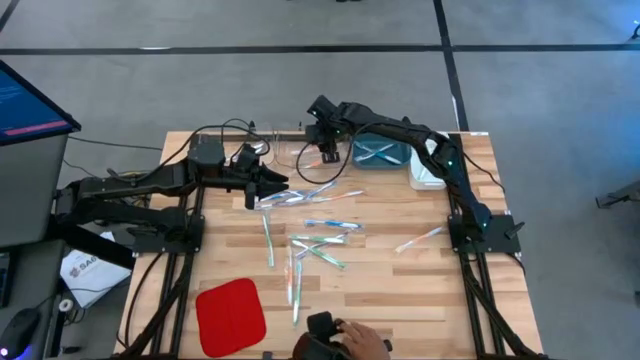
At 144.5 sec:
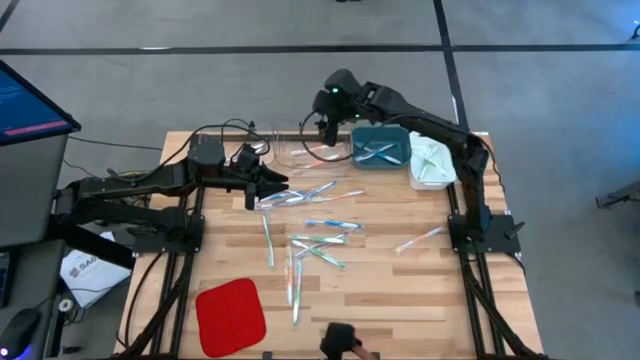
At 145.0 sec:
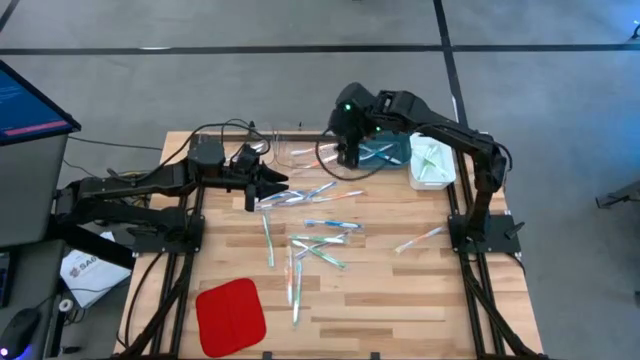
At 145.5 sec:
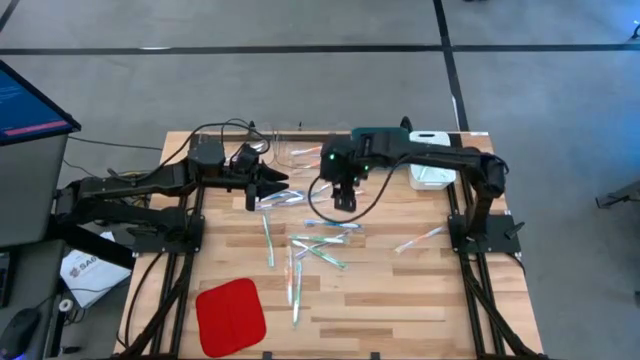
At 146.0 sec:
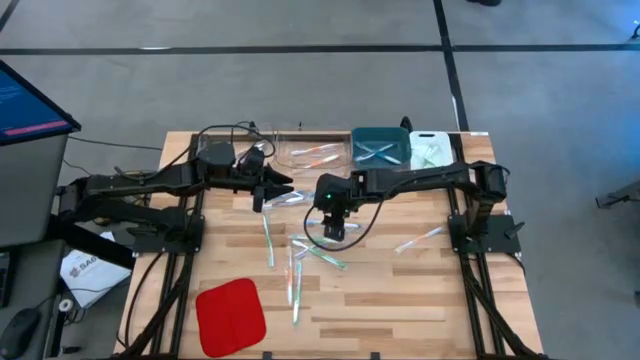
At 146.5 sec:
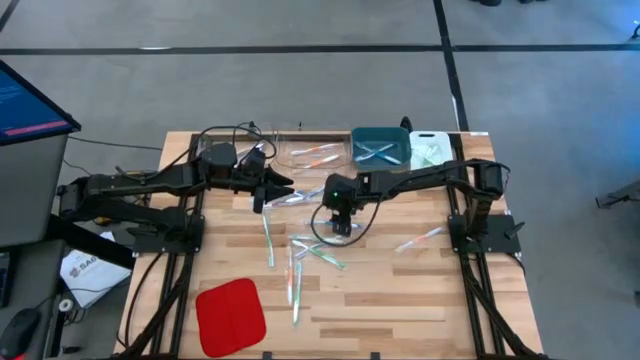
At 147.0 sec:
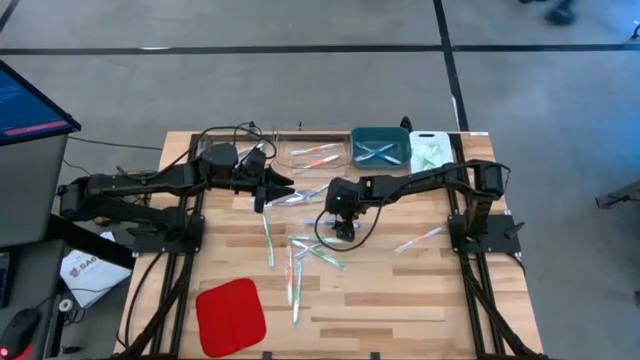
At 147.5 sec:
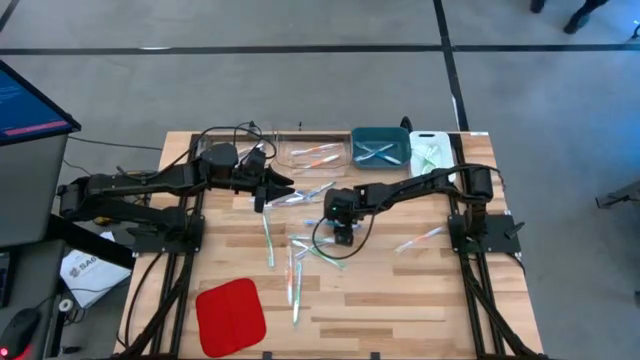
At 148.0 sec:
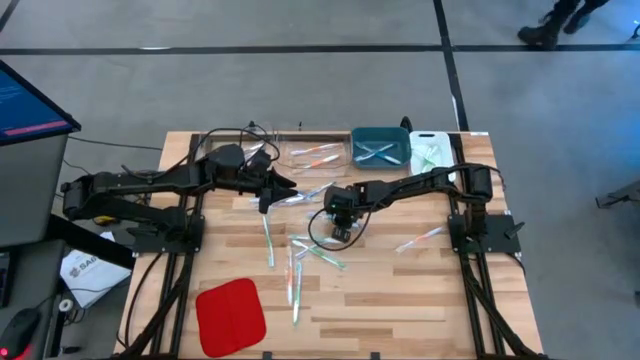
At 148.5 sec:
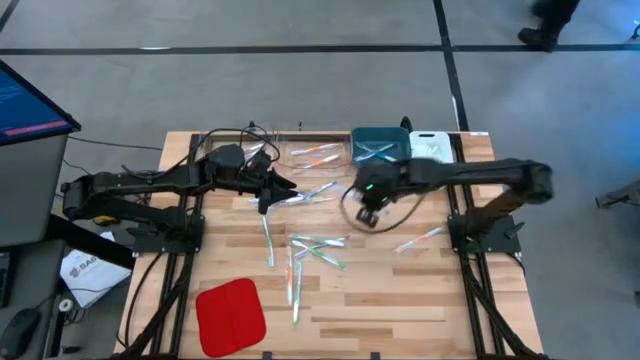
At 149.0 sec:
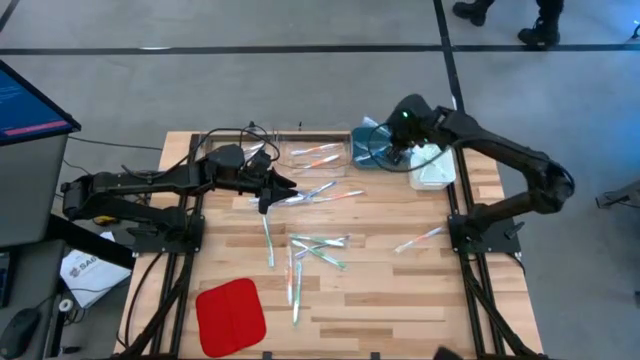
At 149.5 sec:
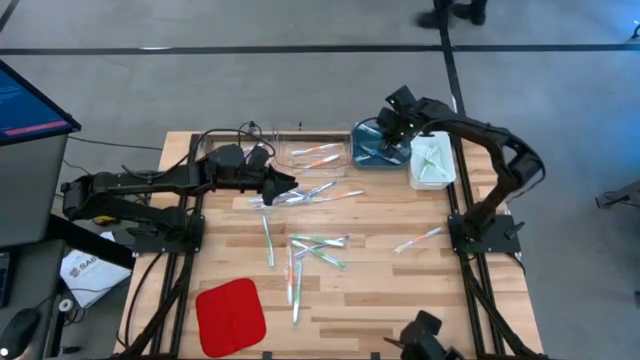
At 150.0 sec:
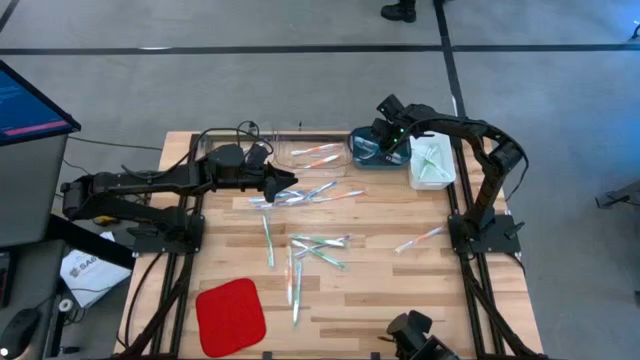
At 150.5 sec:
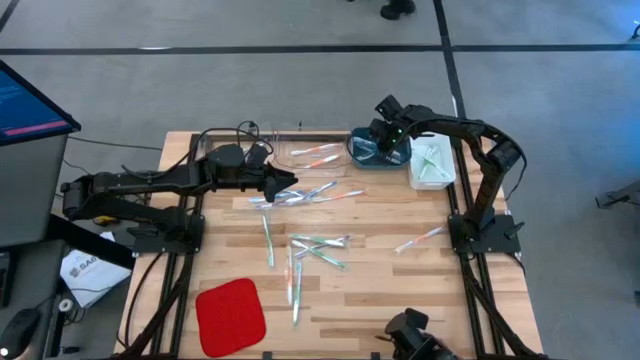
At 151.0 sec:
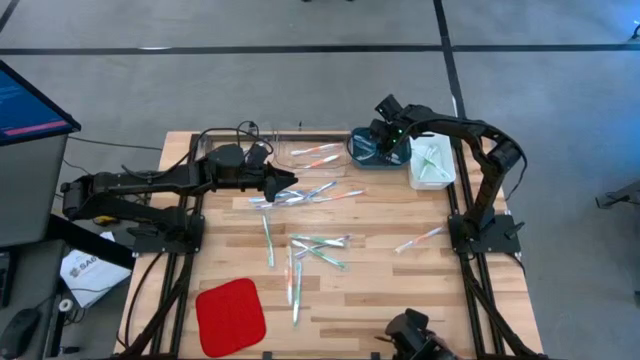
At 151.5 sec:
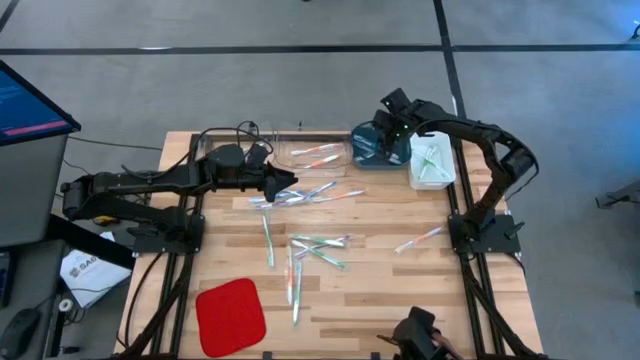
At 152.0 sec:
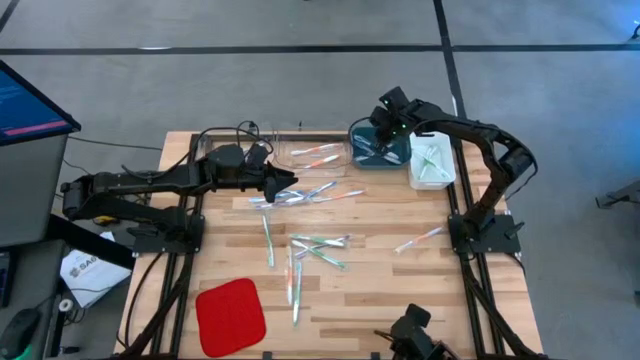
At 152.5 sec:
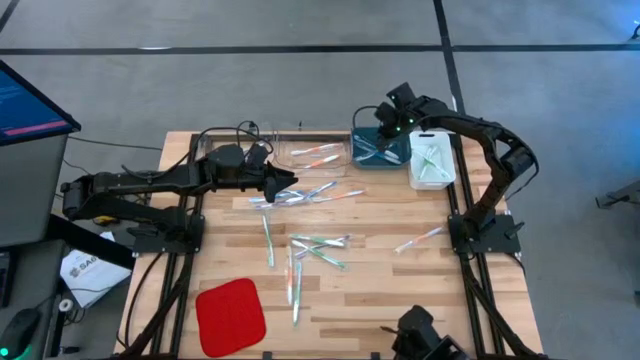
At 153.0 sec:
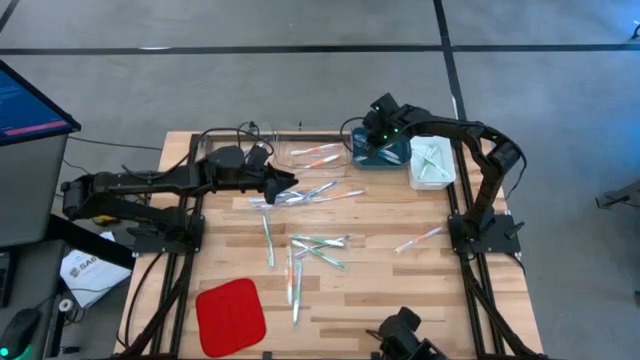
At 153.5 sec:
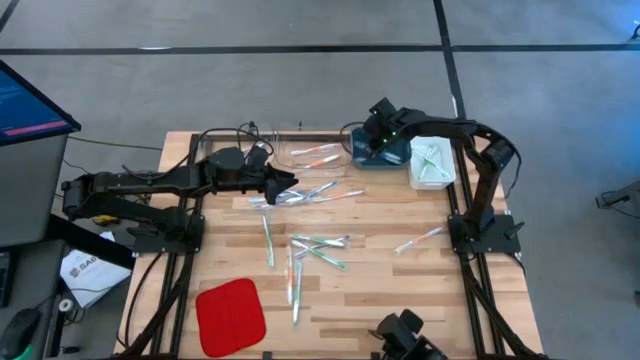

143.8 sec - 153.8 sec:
Task: Pick & Place Toothbrushes
Put the blue toothbrush into the blue bin

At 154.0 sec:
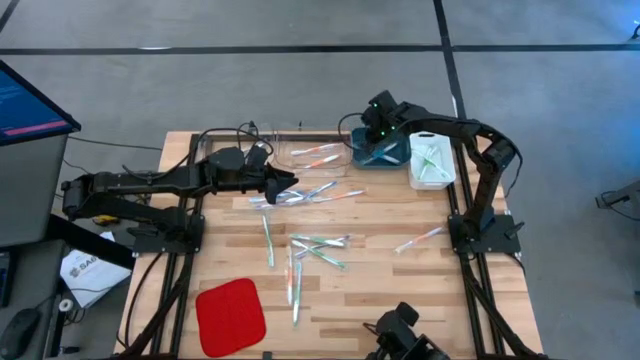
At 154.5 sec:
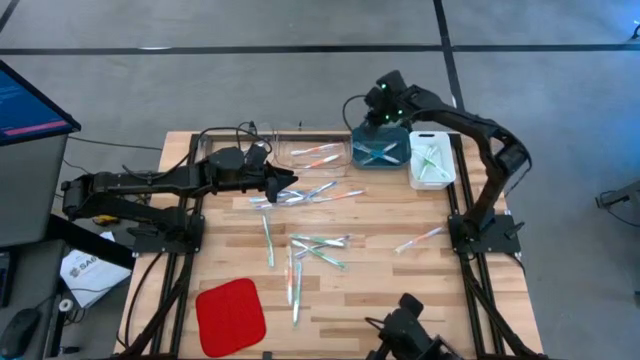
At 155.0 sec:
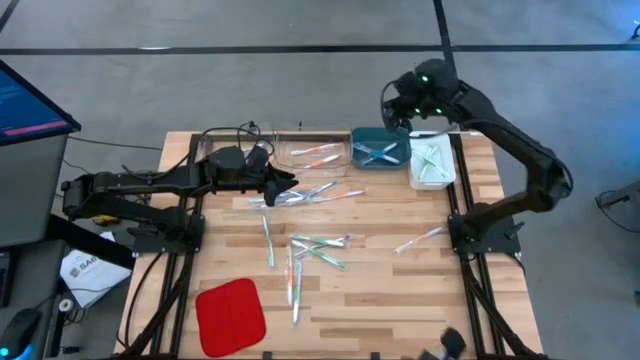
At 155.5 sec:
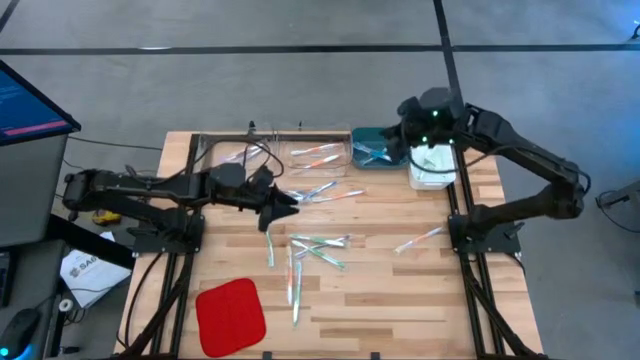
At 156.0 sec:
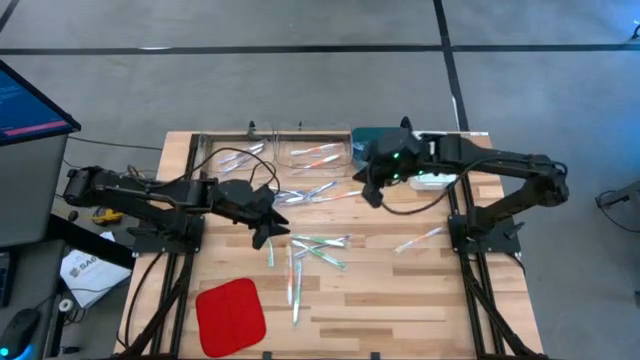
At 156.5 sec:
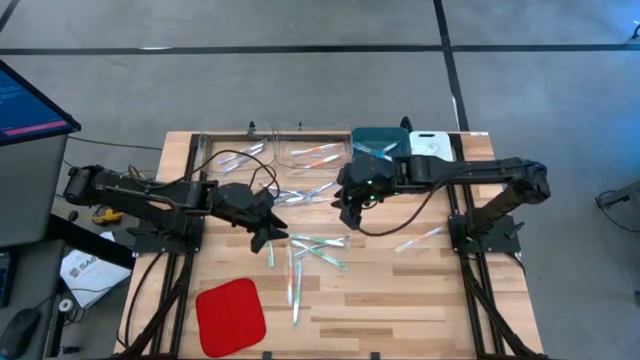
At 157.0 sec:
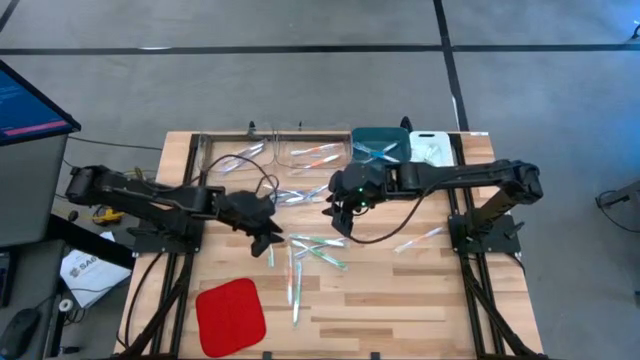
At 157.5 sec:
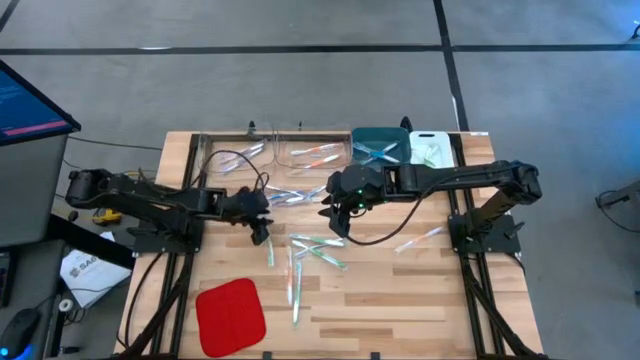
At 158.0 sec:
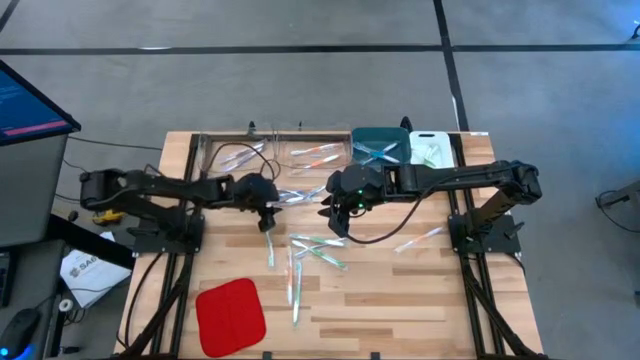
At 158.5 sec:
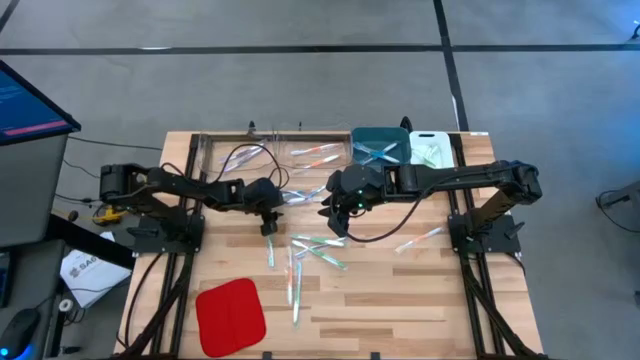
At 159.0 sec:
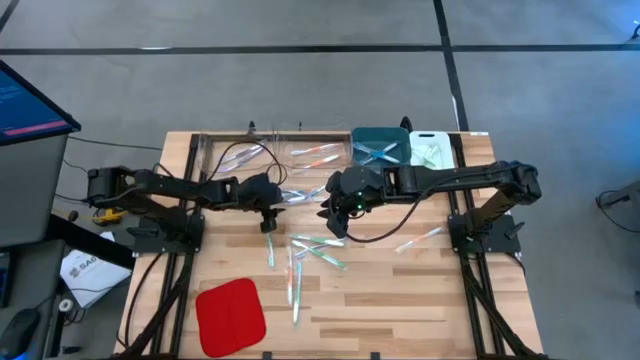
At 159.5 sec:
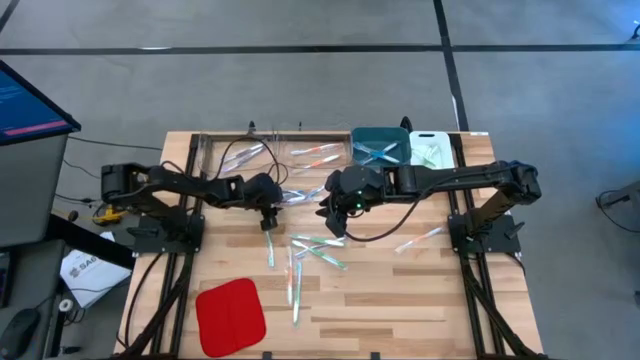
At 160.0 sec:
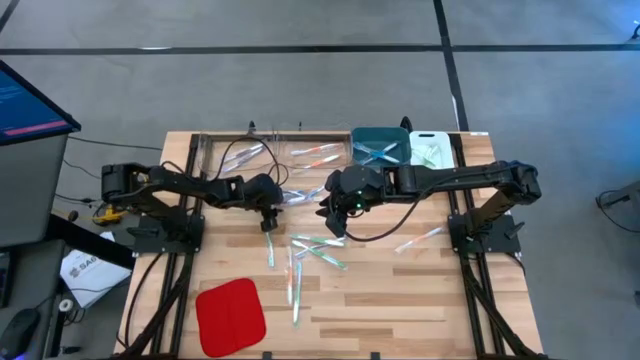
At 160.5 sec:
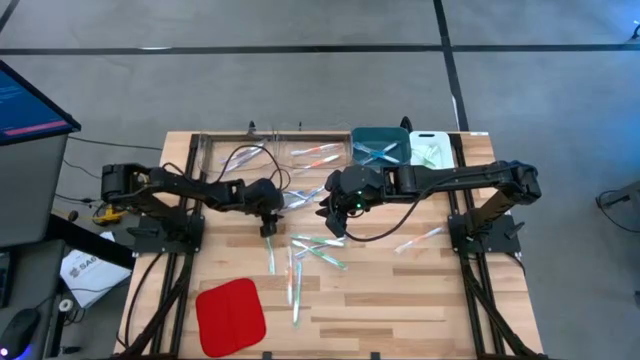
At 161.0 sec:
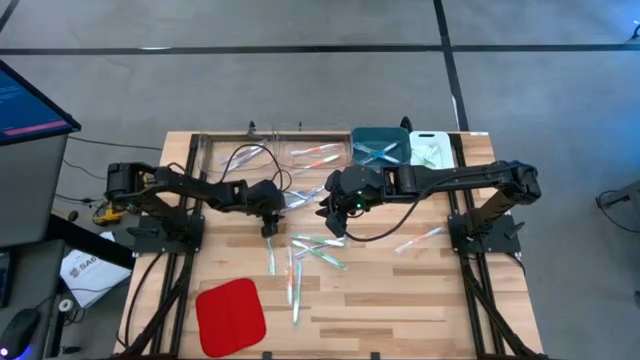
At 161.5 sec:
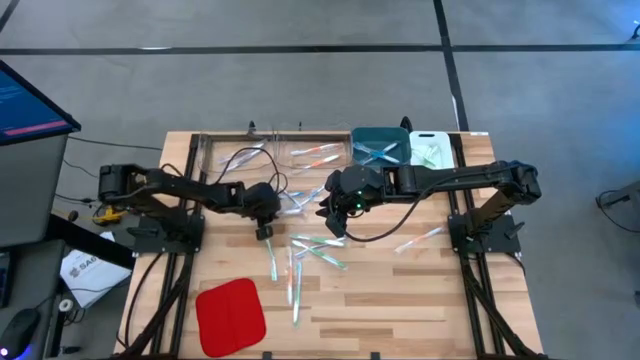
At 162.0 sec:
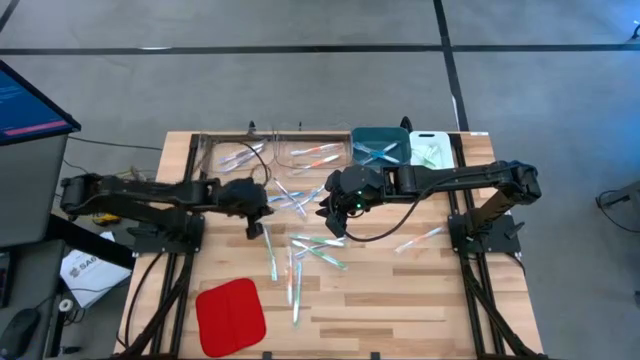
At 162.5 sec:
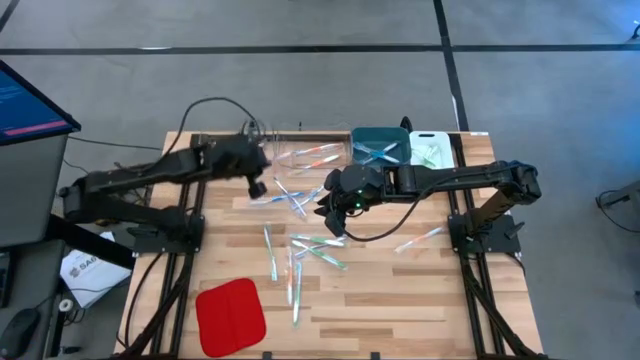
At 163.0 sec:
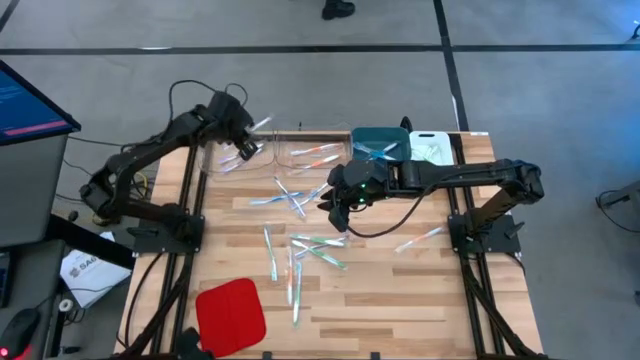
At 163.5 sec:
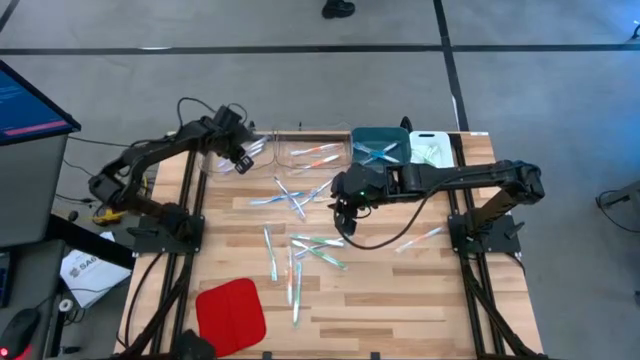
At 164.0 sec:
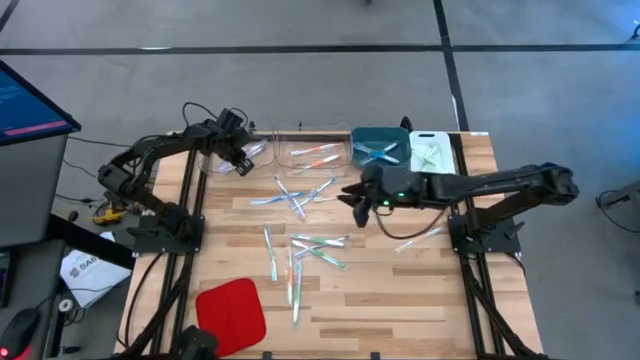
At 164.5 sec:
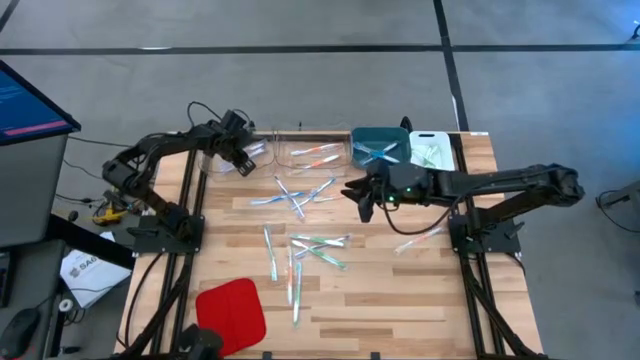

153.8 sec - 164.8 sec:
Put the violet toothbrush into the left transparent bin
